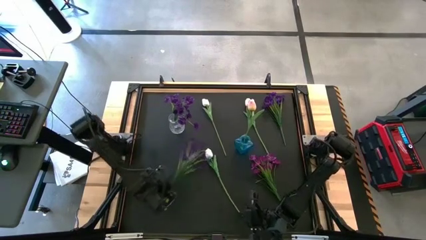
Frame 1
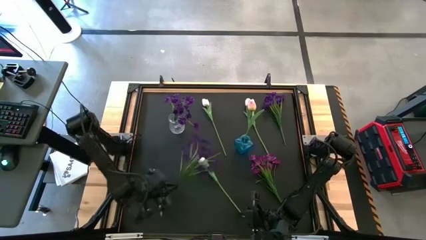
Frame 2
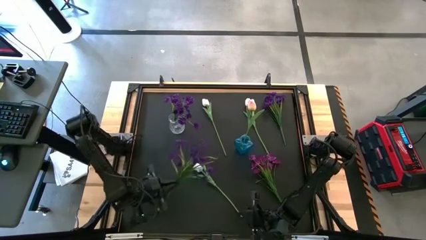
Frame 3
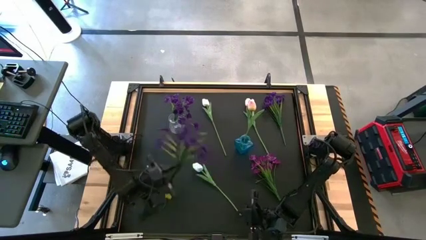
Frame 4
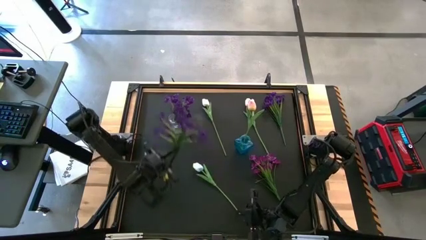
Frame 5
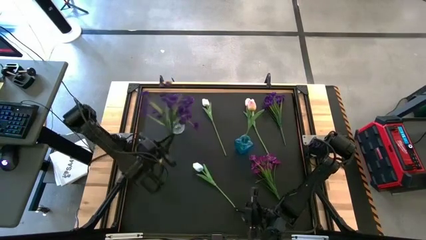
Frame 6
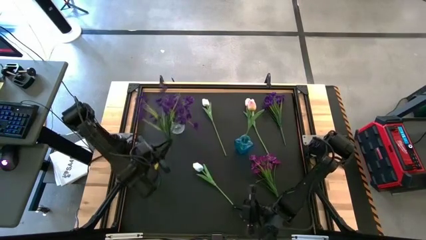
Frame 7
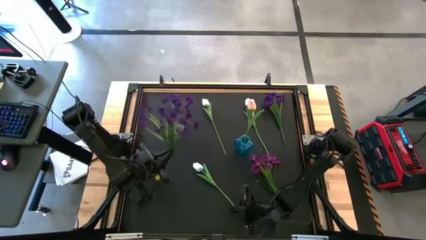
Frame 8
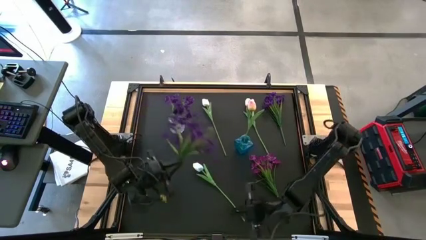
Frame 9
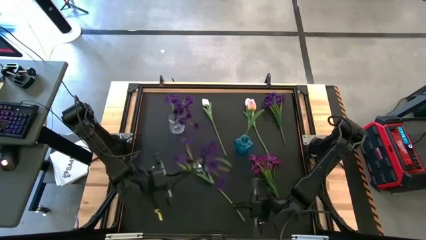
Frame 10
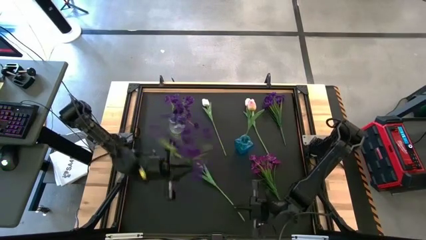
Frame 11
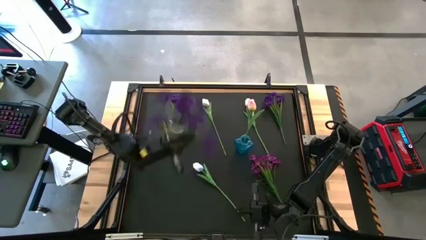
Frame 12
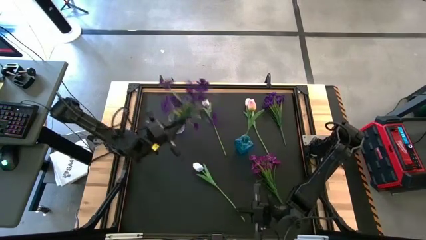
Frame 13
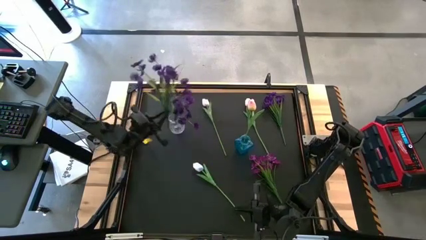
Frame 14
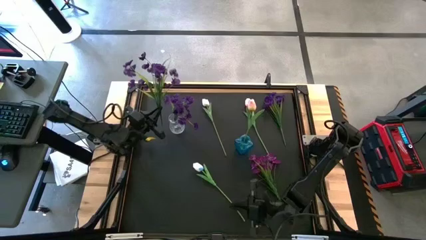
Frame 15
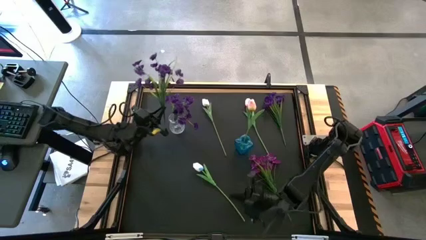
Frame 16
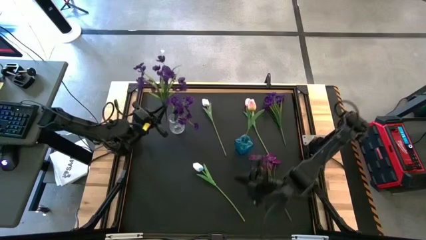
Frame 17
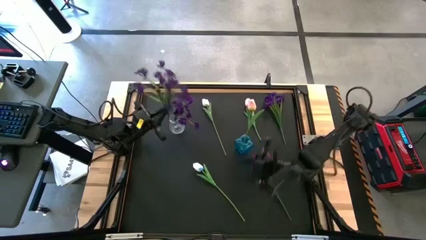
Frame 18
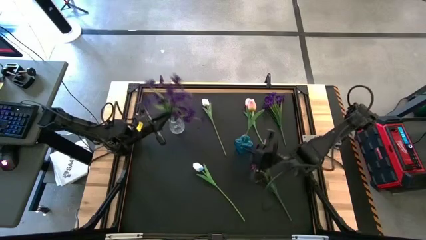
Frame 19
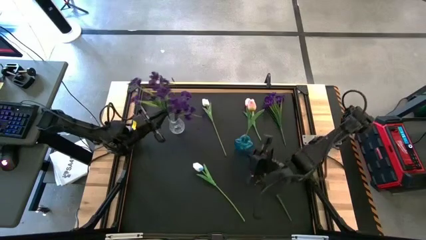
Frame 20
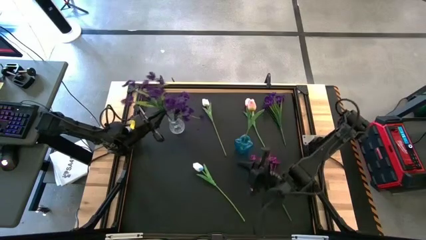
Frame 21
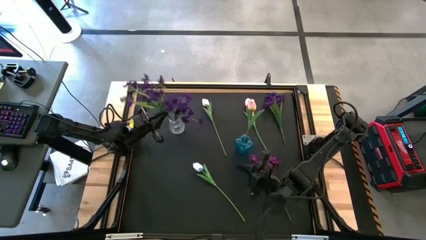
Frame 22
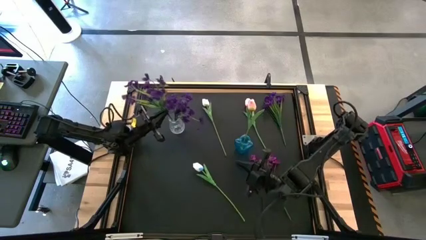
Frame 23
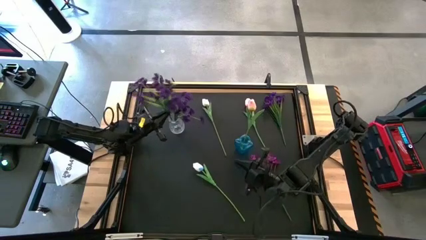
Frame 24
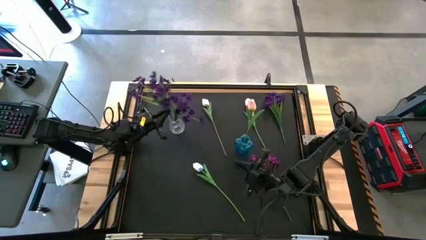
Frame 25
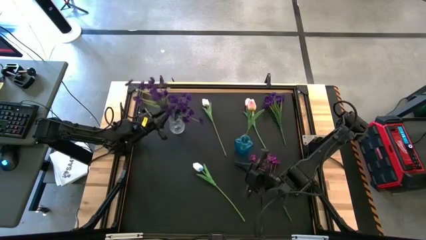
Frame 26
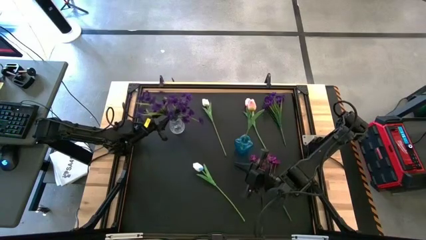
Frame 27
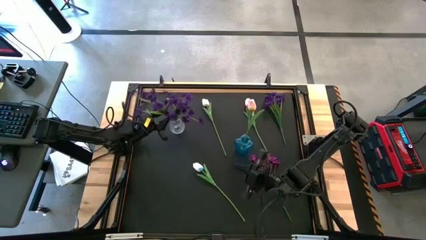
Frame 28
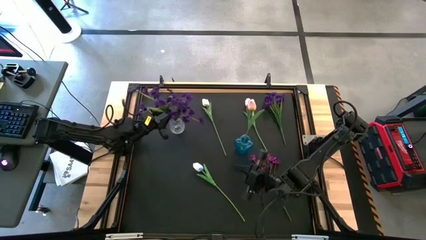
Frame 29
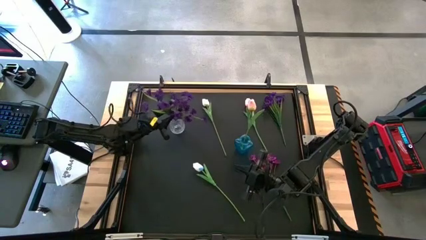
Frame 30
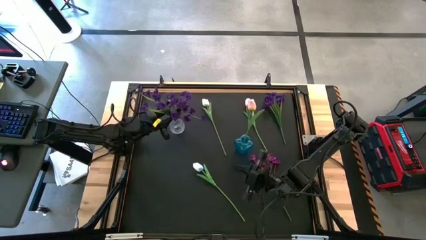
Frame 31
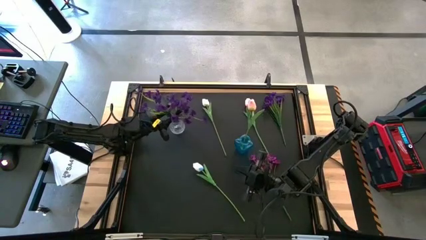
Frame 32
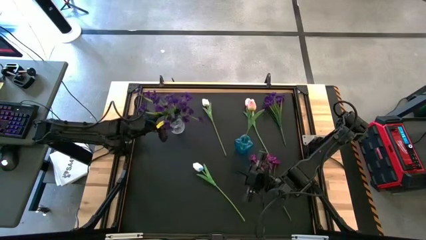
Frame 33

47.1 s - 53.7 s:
Task: Sort flowers into vase by color
Put the bottom purple flowers into the transparent vase

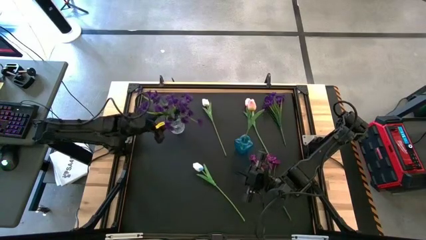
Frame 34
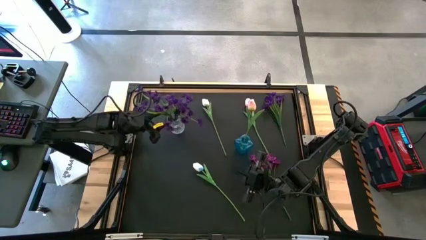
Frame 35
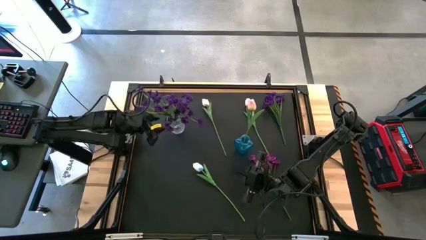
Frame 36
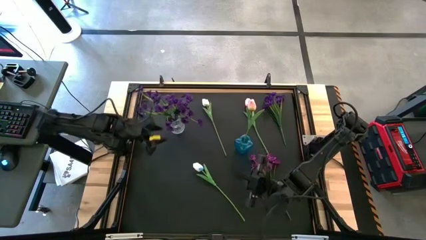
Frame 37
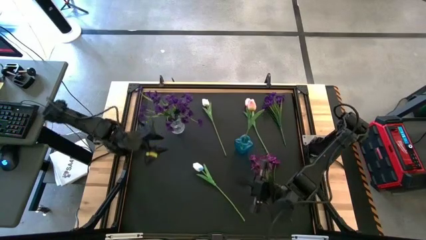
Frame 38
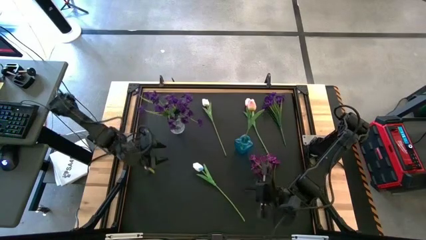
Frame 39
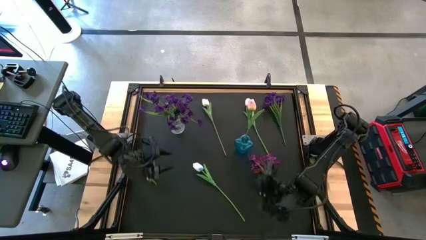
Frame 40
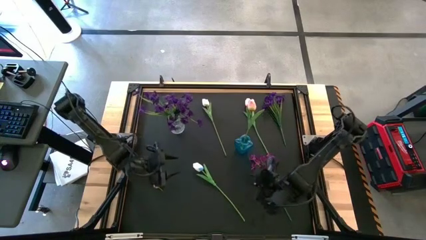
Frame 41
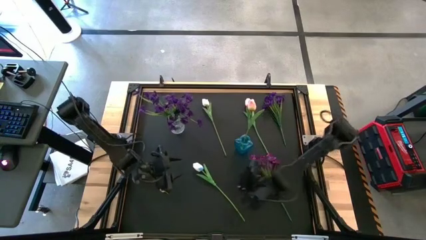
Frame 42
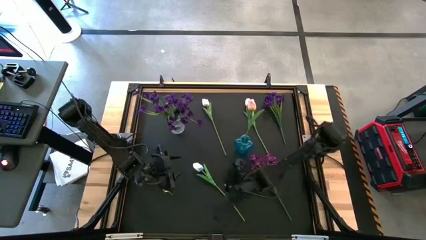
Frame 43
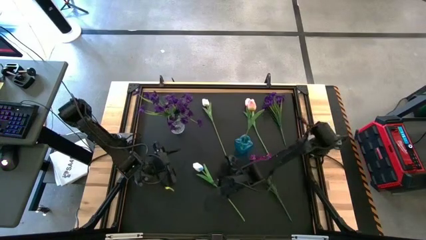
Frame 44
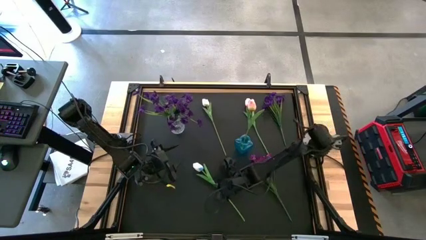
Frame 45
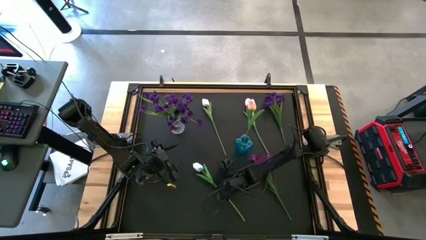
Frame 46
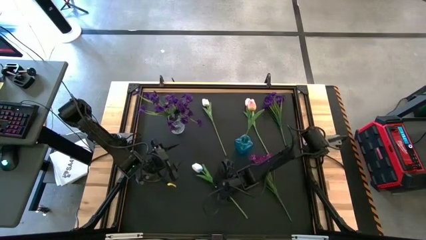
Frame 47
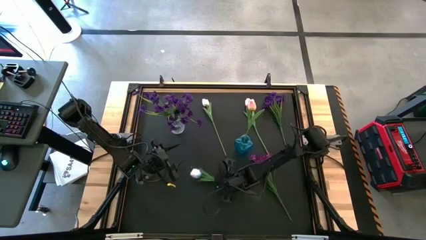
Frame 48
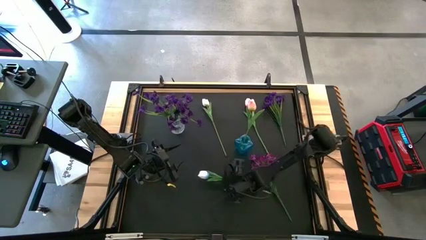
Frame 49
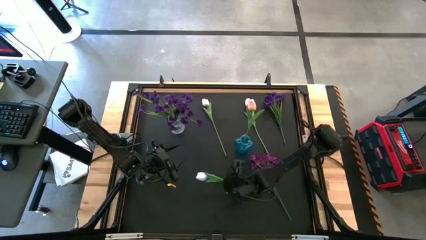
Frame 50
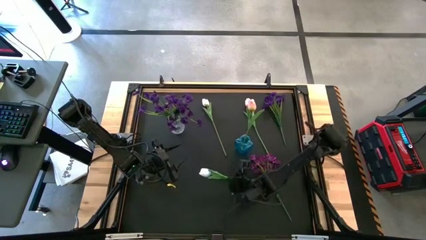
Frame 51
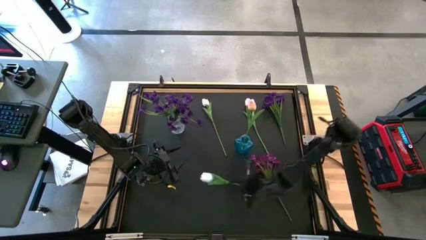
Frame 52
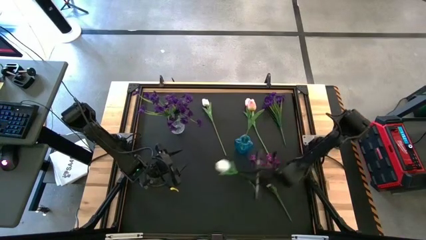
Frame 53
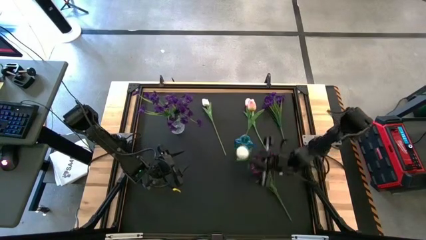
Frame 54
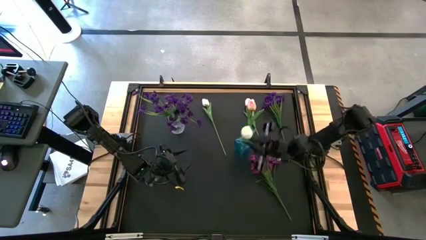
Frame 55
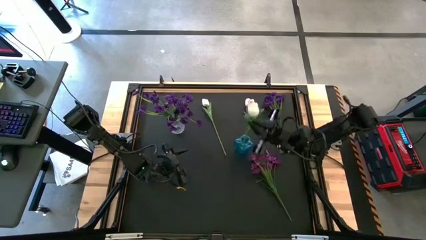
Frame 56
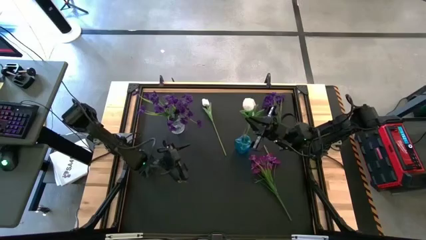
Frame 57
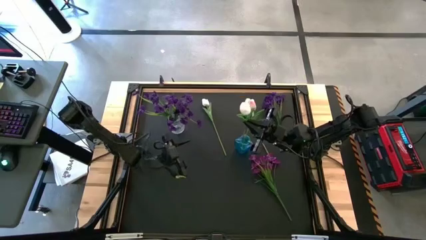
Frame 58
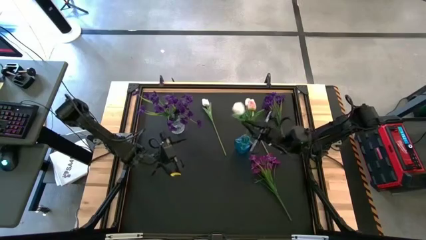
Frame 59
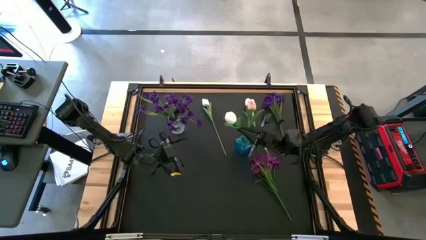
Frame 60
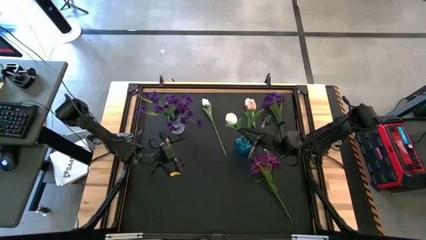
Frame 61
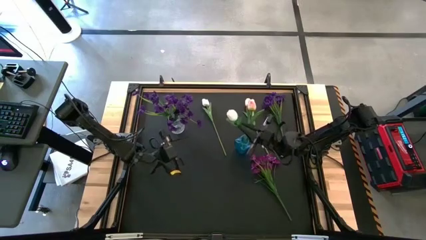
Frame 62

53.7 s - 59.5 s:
Put the bottom white flower into the blue vase

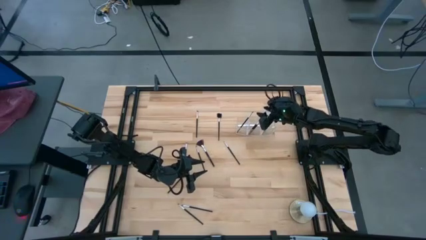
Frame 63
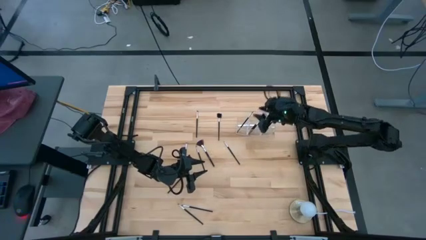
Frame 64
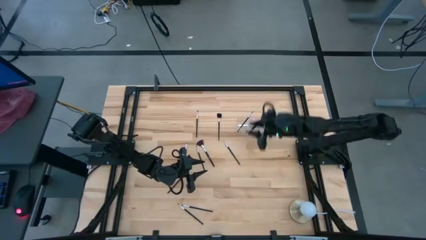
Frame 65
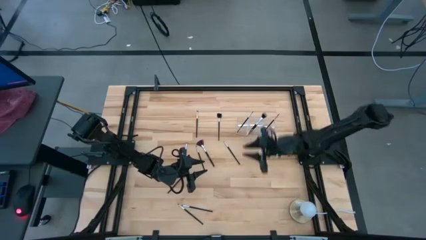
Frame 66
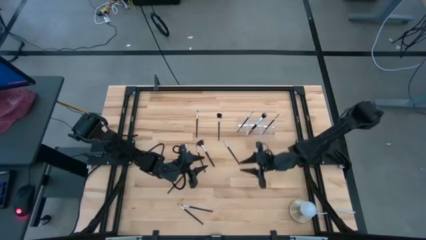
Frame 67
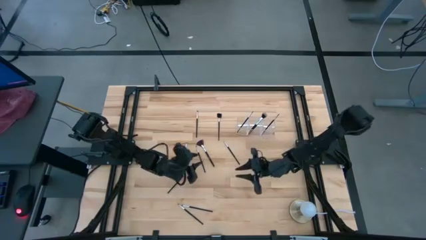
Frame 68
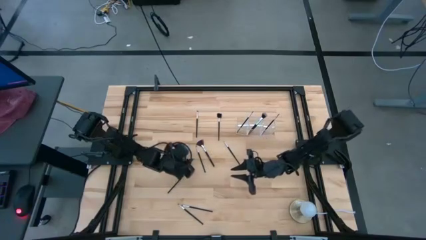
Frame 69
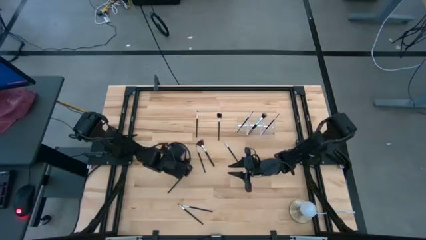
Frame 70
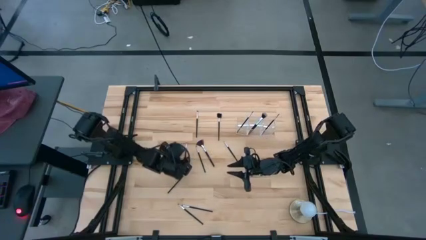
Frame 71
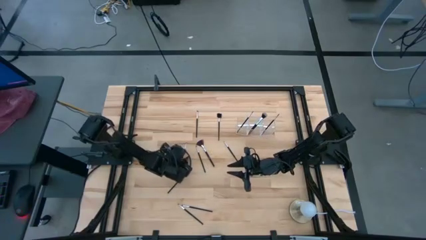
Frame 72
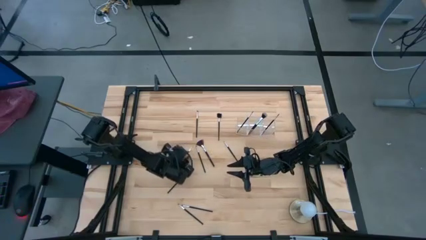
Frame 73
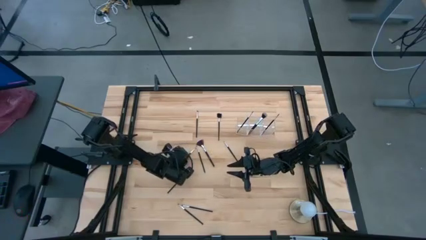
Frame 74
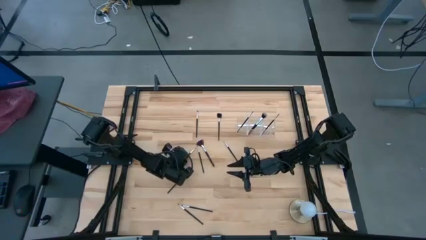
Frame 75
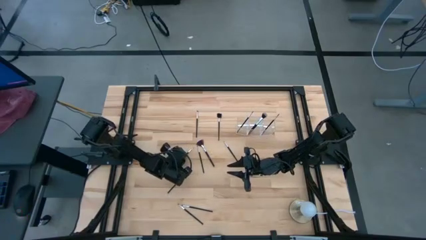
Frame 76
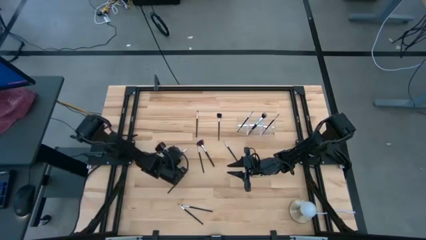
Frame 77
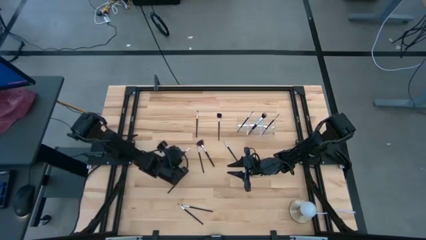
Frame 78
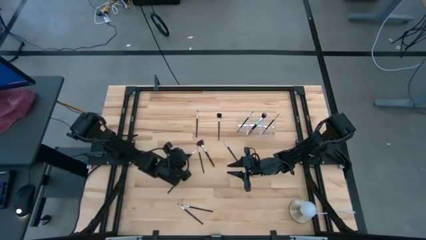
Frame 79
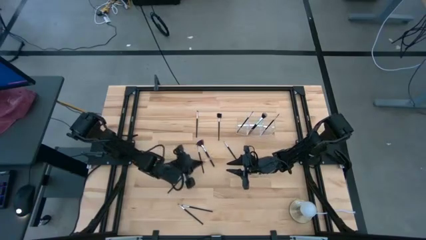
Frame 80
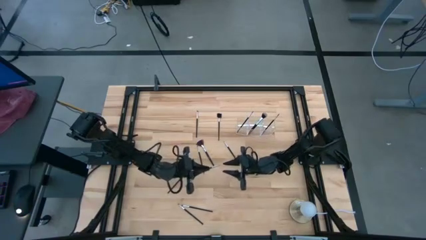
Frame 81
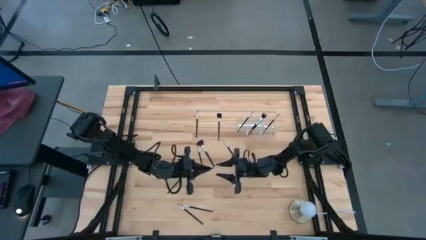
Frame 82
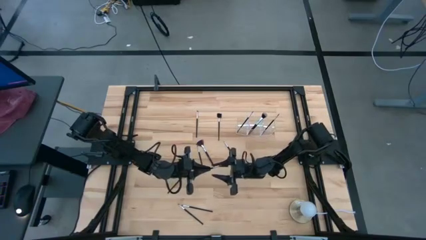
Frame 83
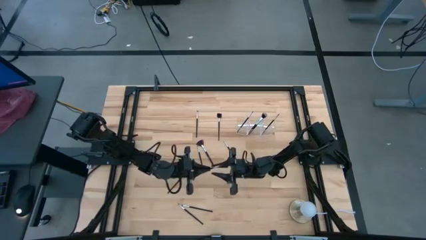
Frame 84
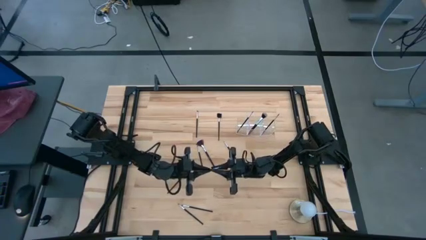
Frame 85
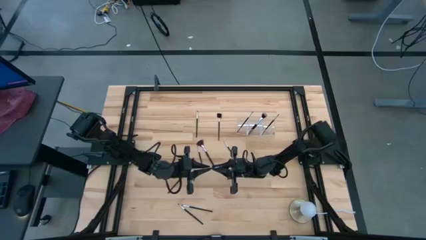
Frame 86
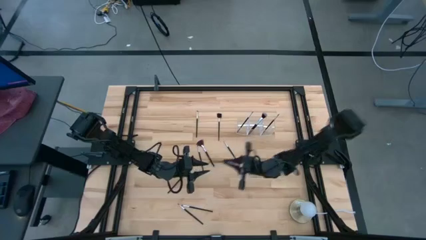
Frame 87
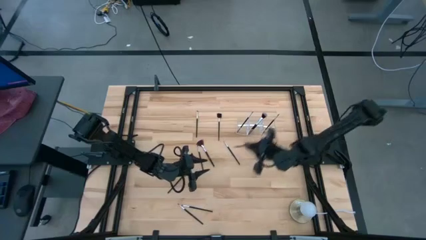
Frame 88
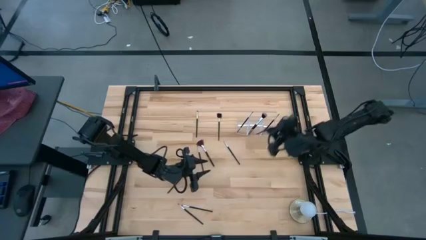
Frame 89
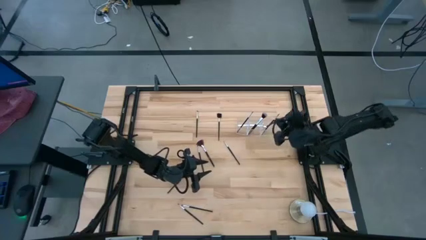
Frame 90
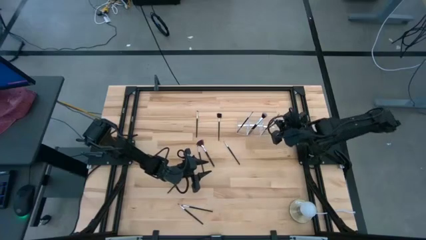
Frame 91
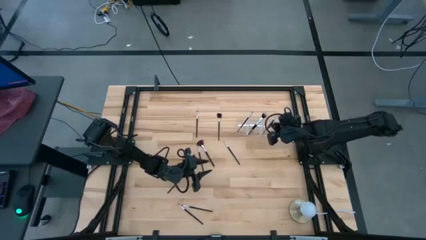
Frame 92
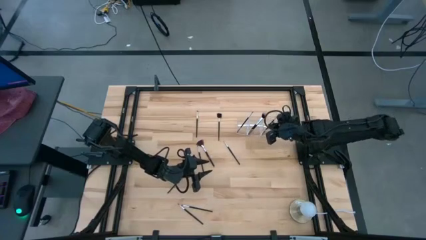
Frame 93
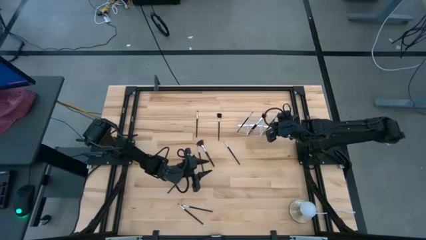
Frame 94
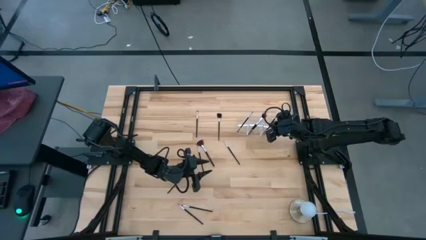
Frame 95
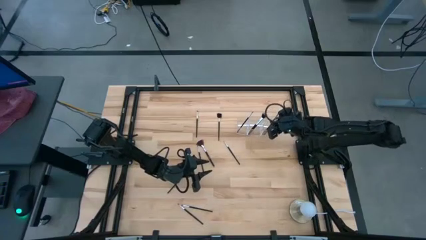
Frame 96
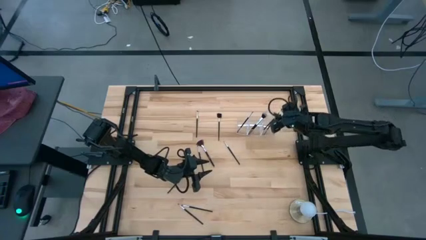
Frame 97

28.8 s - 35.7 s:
Task: Put items in baskets/containers
Put the black liner brush into the transparent organizer
